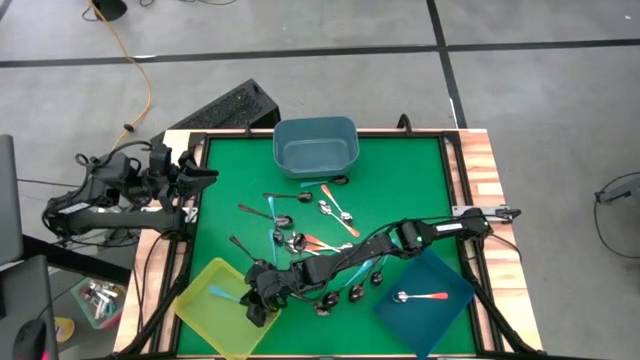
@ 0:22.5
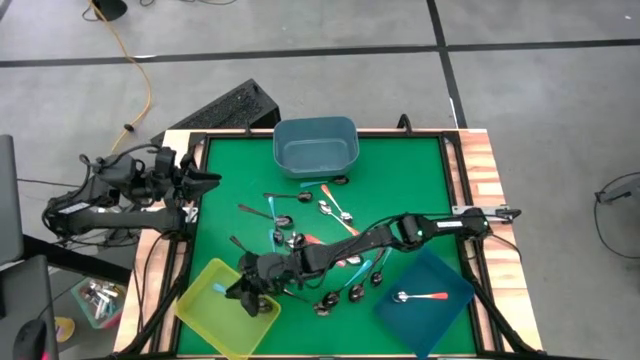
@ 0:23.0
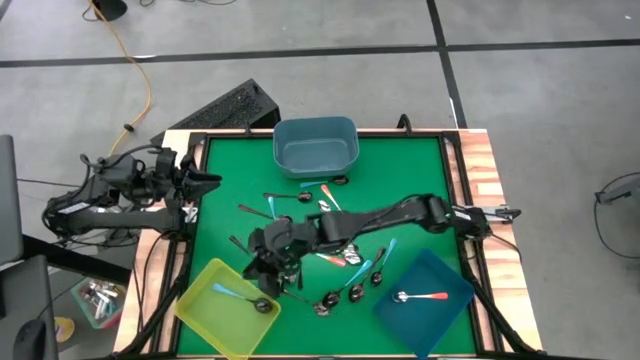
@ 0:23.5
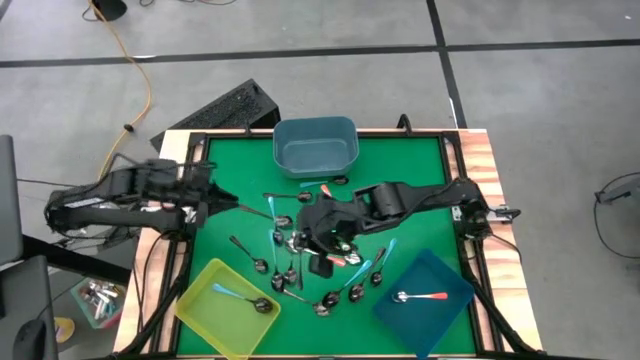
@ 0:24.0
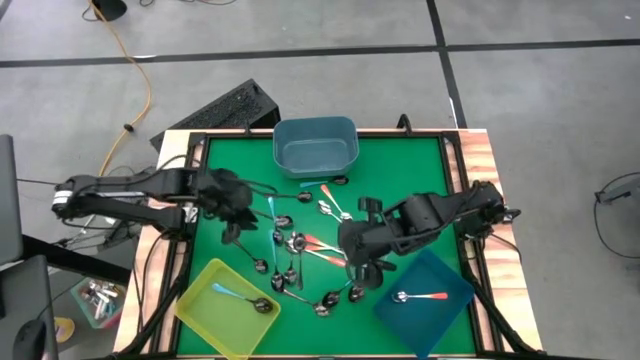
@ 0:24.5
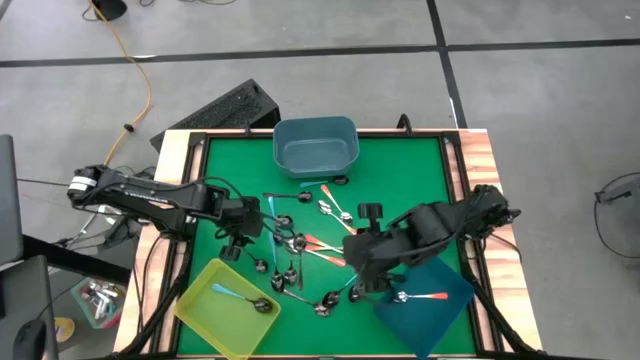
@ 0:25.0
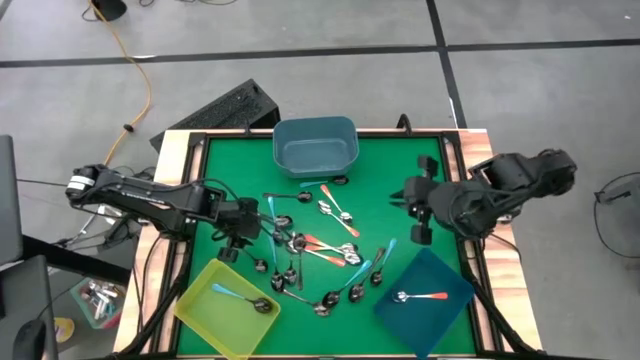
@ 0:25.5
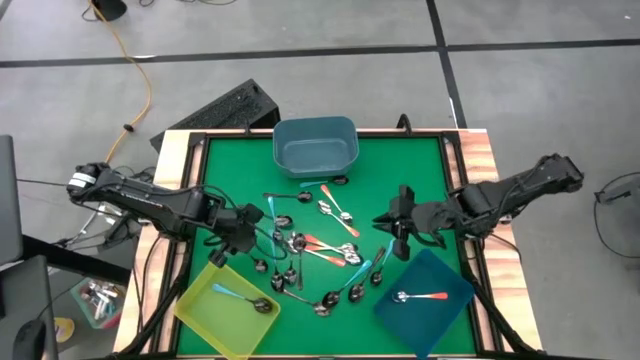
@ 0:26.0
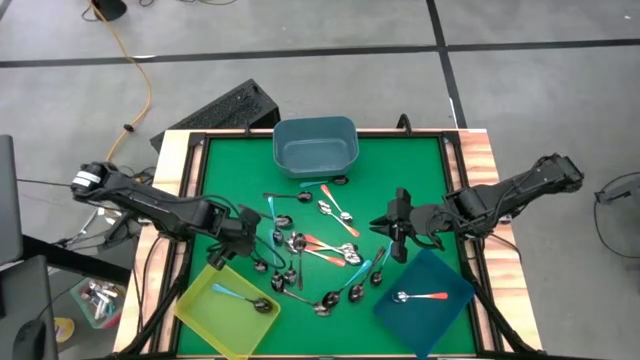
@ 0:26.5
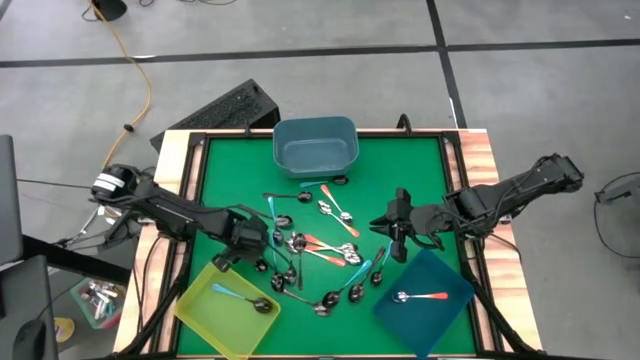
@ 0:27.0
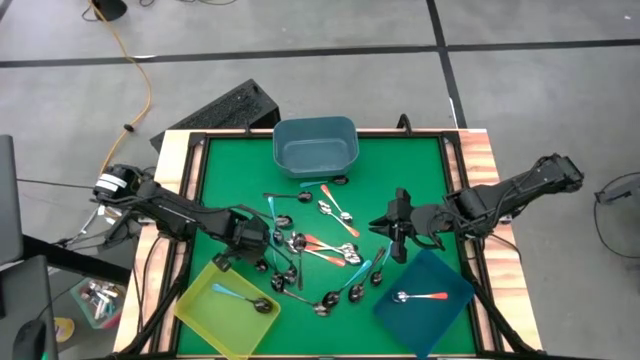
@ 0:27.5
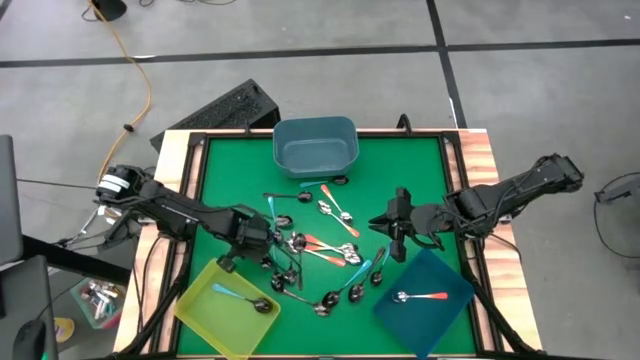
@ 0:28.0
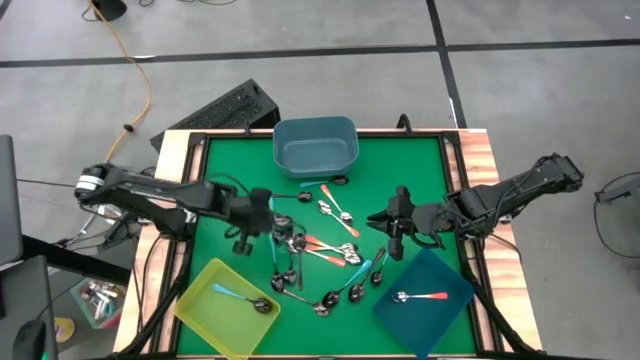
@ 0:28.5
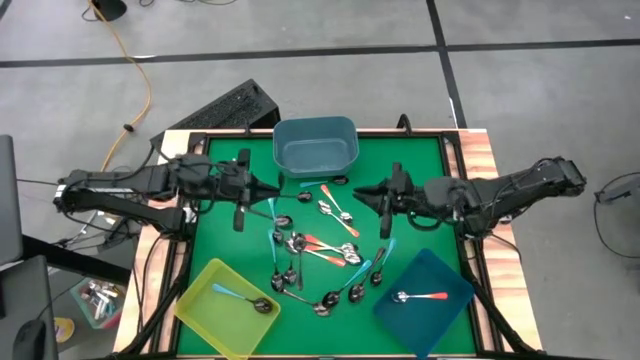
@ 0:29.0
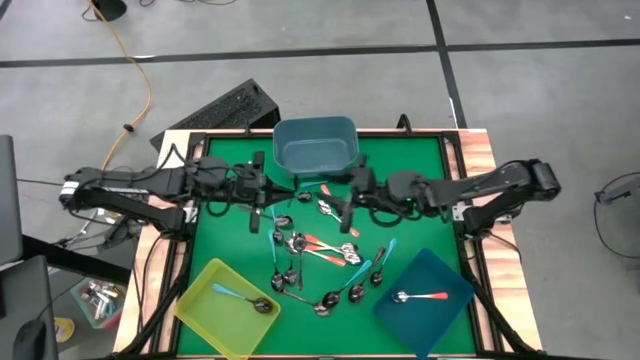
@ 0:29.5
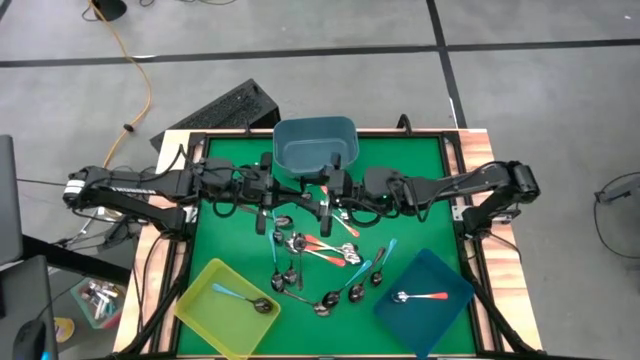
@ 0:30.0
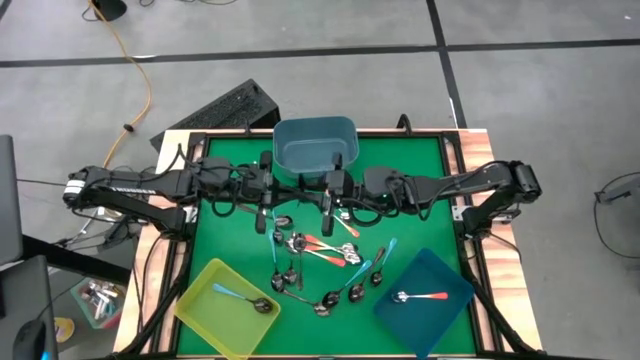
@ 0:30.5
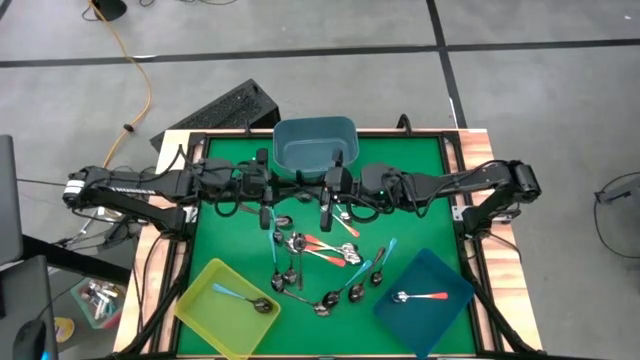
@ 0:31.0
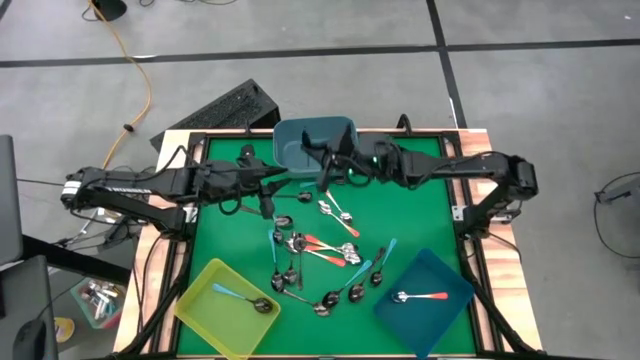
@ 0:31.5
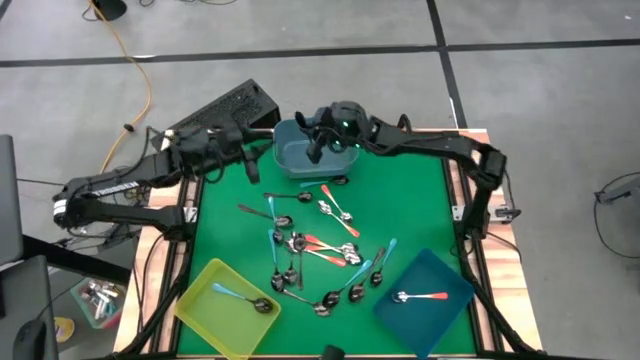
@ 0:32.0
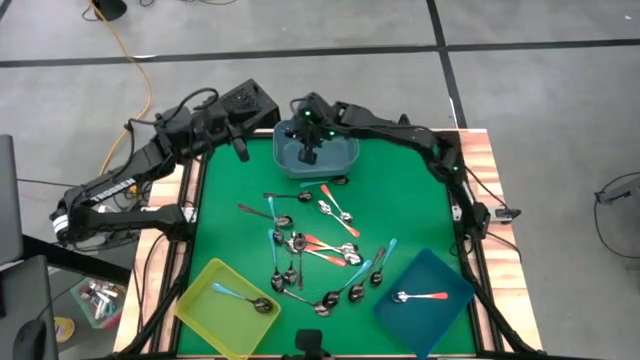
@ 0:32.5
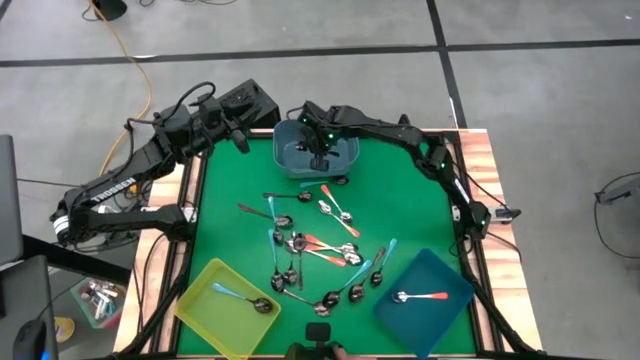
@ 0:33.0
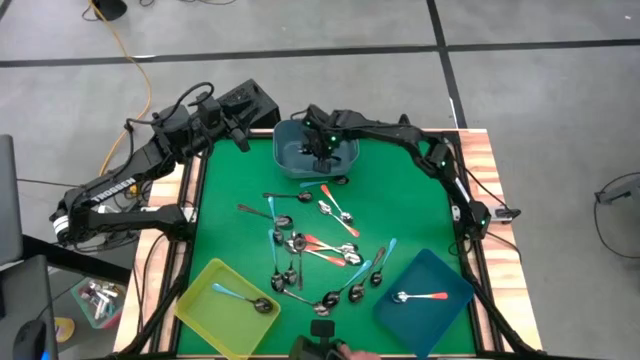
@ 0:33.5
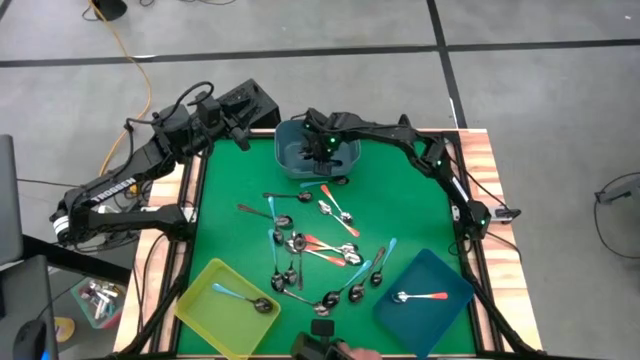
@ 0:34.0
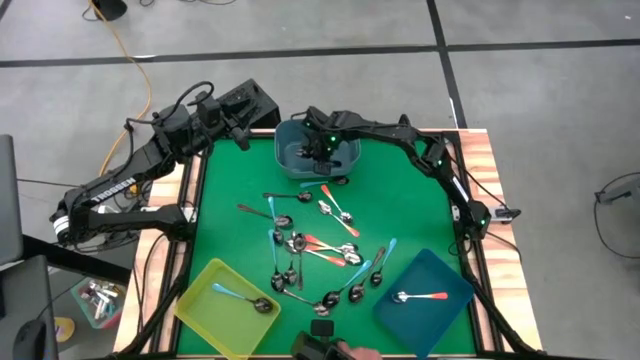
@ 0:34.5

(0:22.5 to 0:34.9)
Task: Sort silverware by color (type)
Put the black spoon into the light blue bin

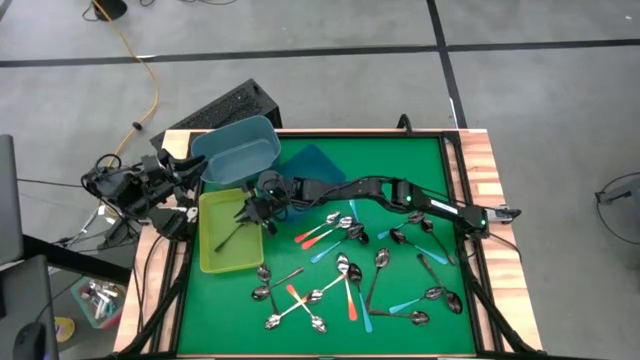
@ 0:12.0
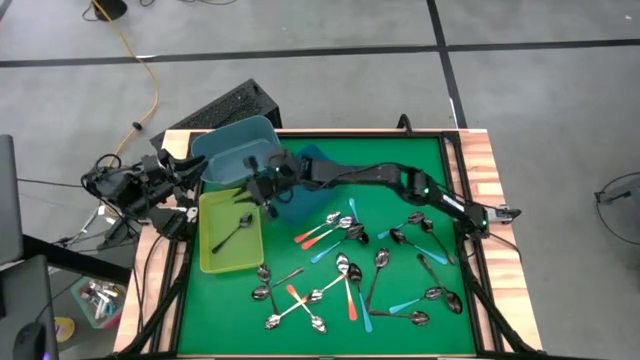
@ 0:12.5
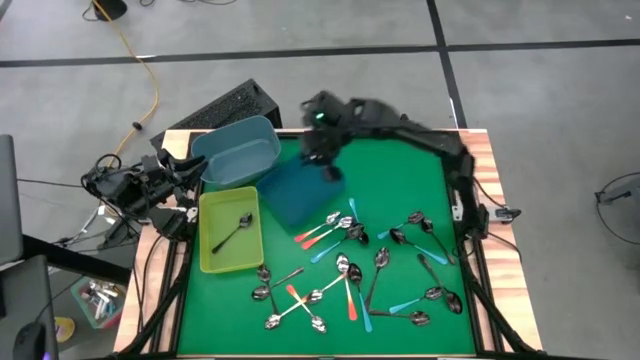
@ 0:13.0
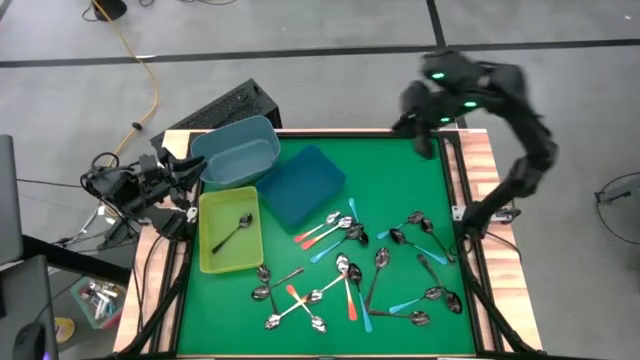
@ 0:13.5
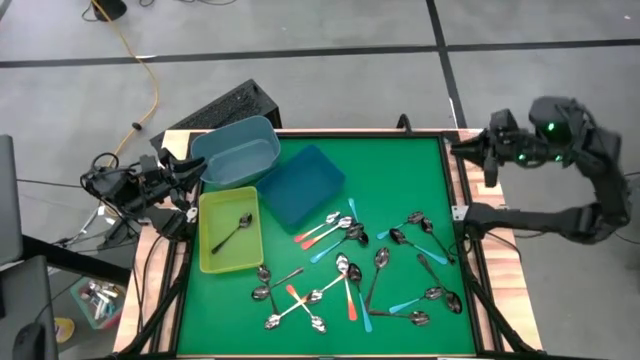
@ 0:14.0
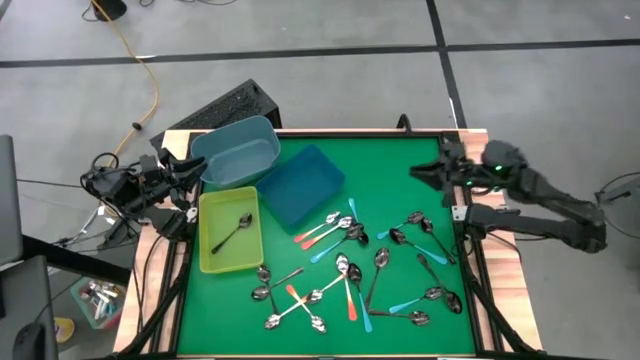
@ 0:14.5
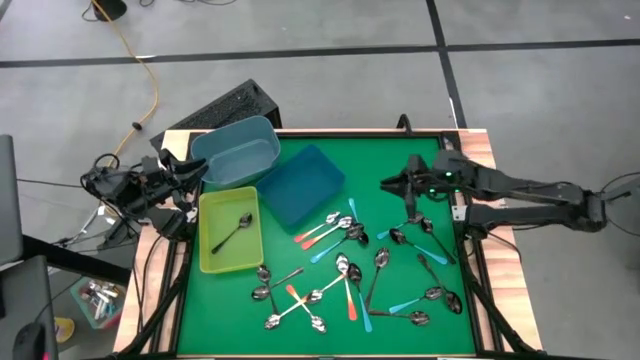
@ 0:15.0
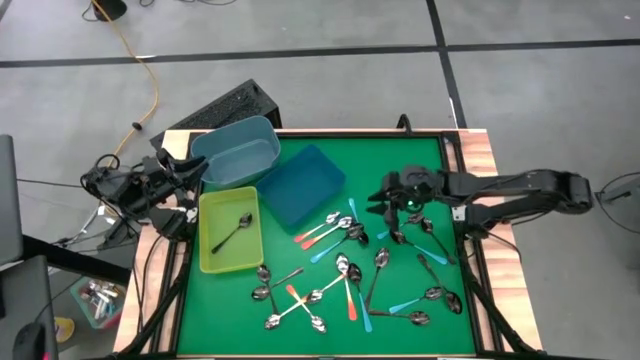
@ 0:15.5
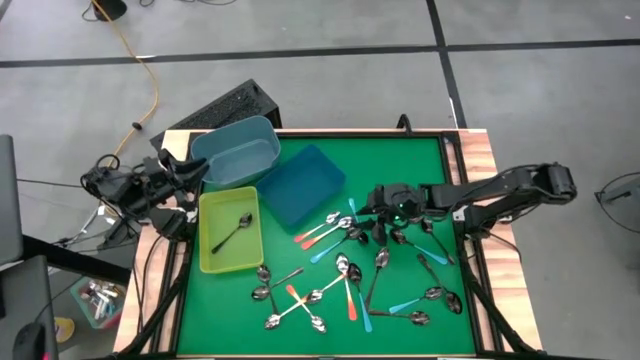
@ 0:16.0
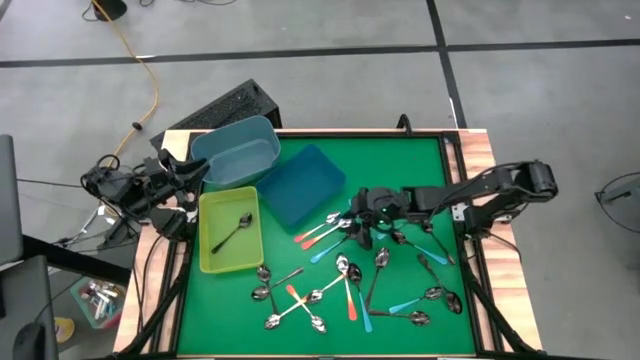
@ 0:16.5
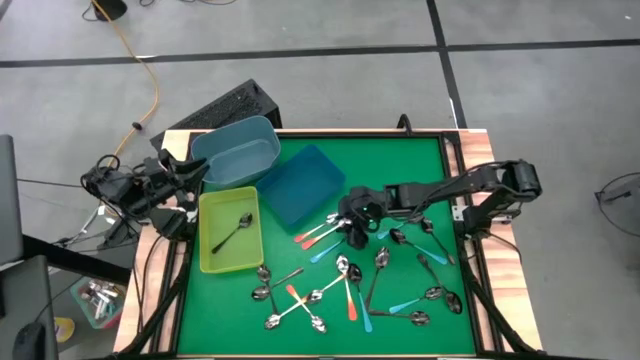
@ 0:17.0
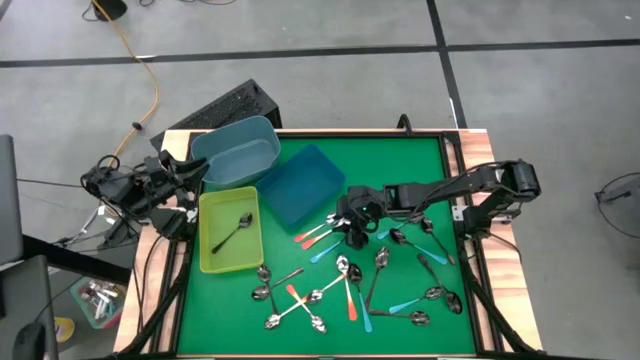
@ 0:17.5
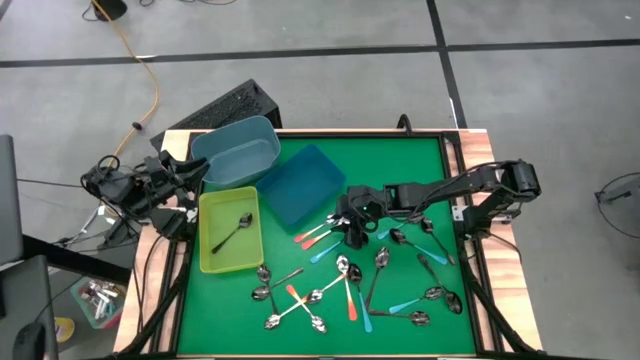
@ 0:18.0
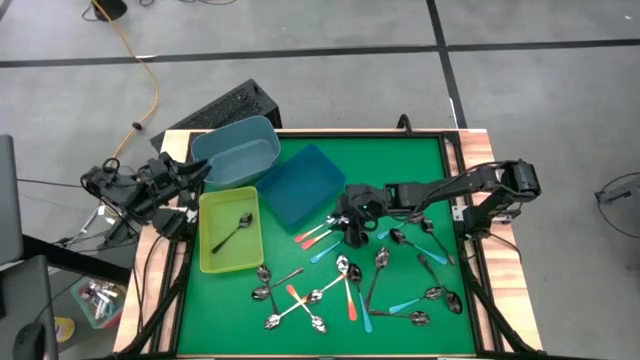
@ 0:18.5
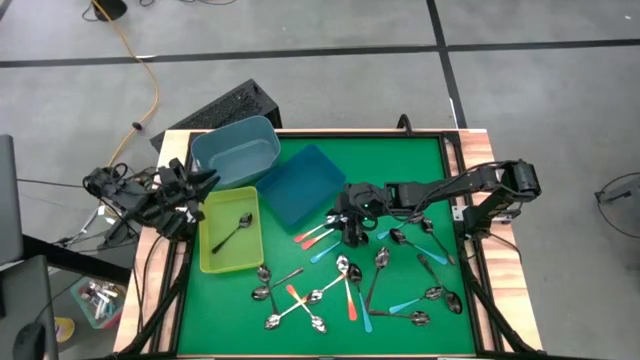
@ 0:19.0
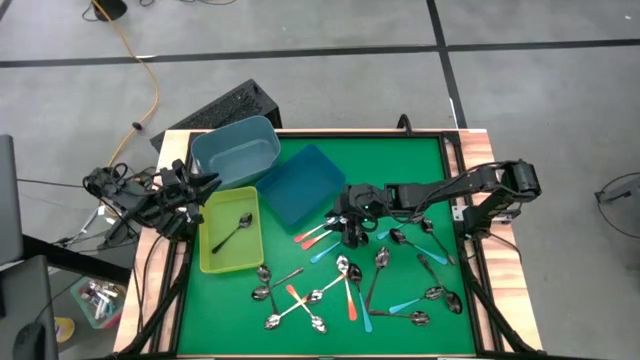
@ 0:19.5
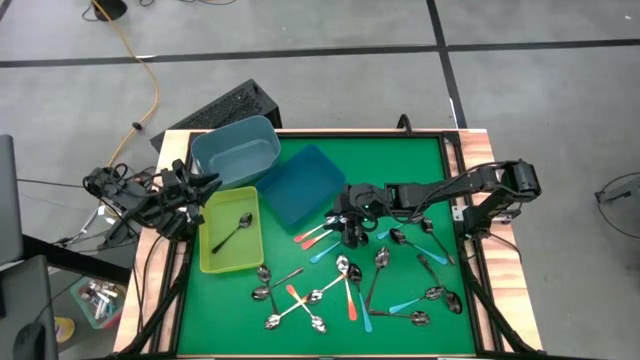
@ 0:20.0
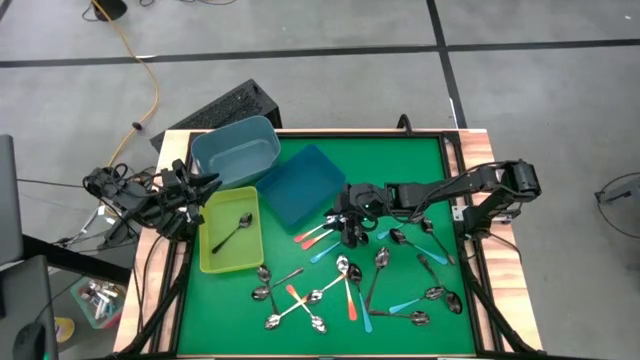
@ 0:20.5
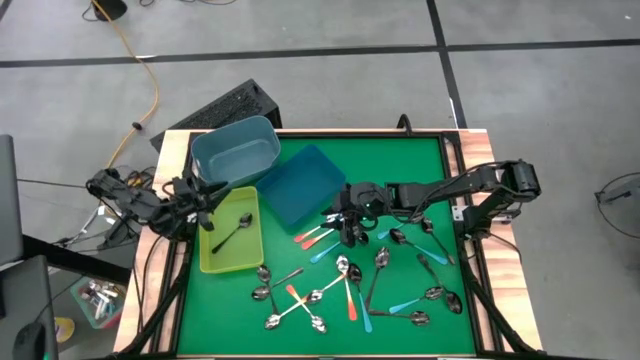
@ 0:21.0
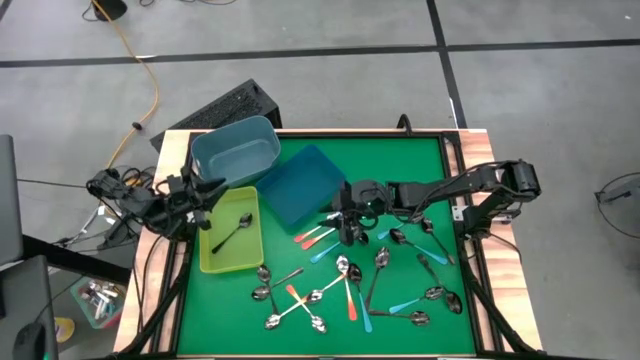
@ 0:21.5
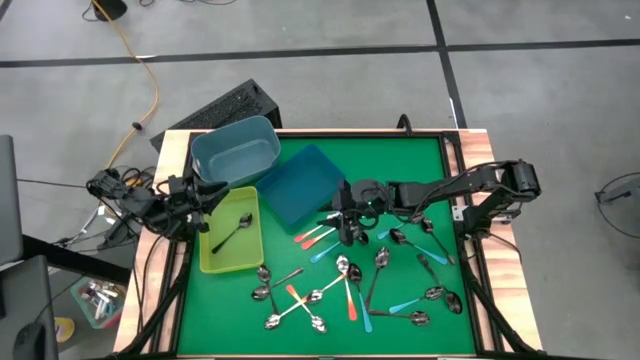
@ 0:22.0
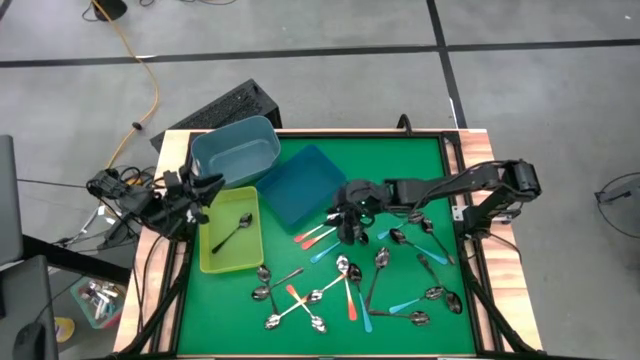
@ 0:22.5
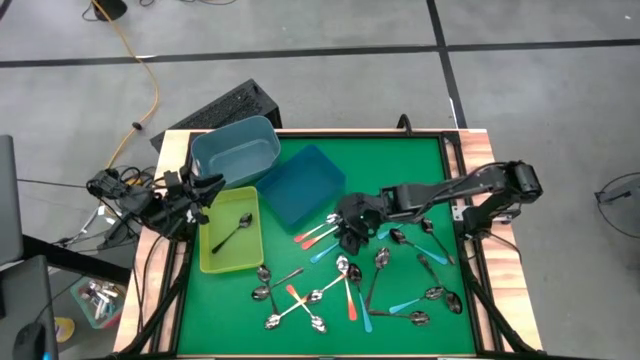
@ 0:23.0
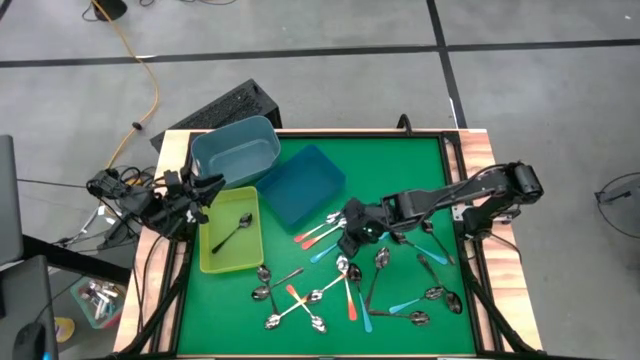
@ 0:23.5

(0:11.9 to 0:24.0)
Task: Sort silverware by color (type)
Put the blue spoon into the light blue bin
